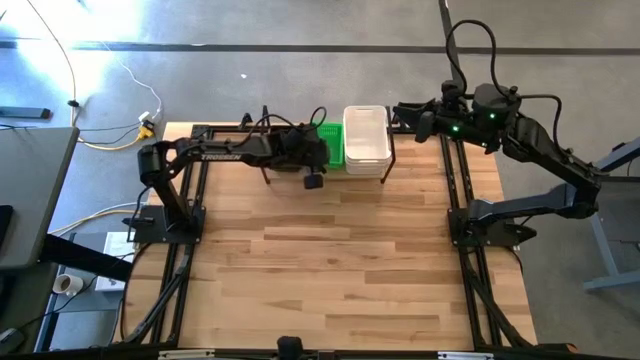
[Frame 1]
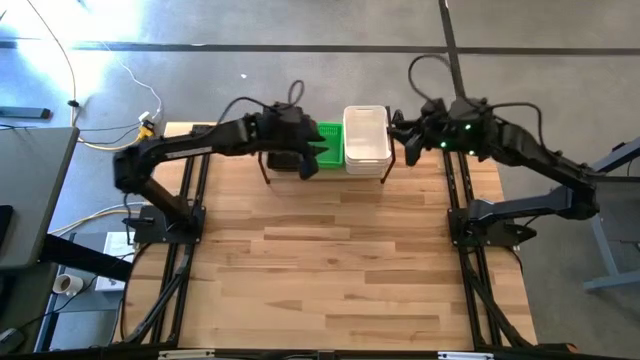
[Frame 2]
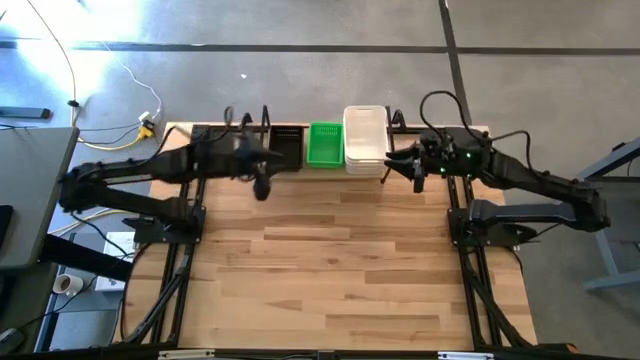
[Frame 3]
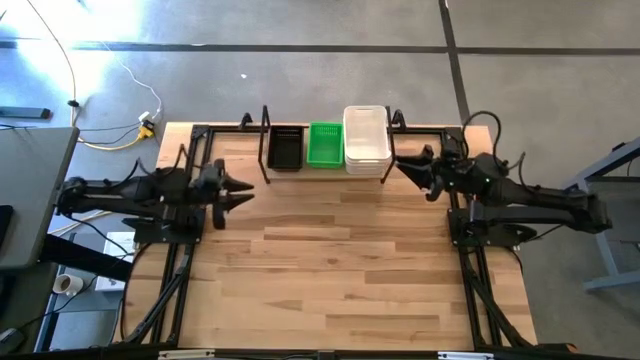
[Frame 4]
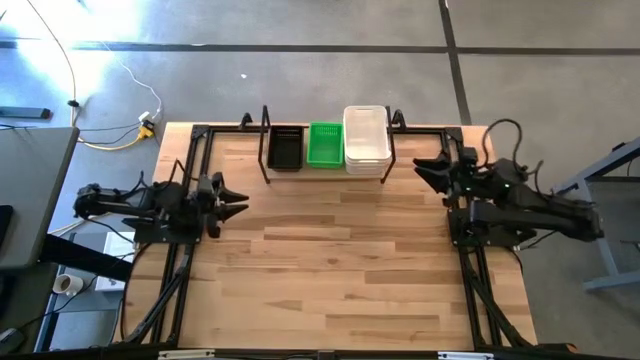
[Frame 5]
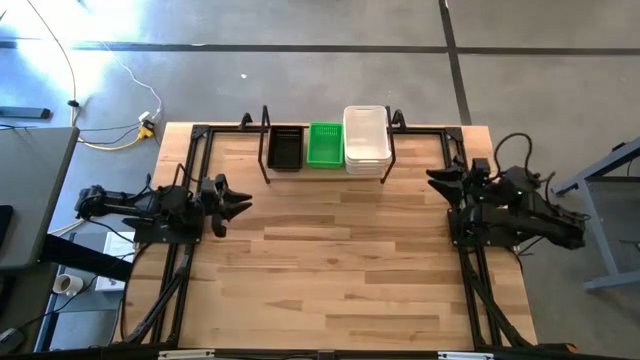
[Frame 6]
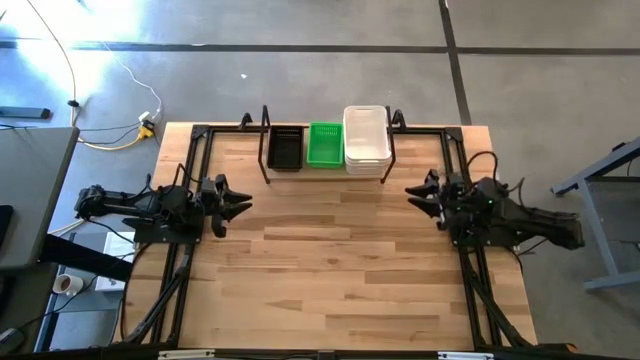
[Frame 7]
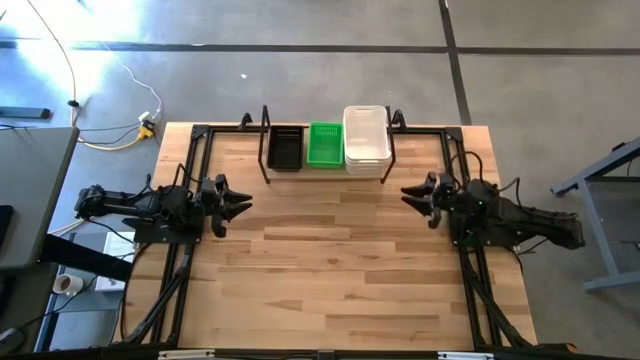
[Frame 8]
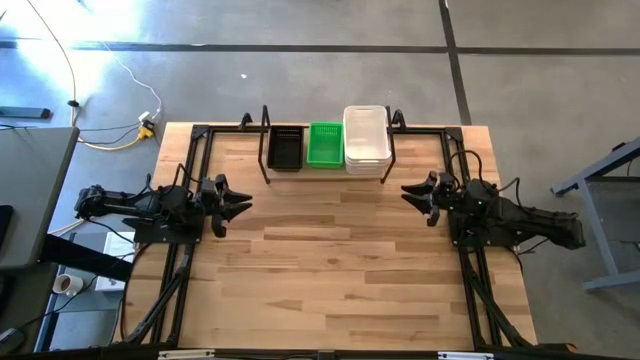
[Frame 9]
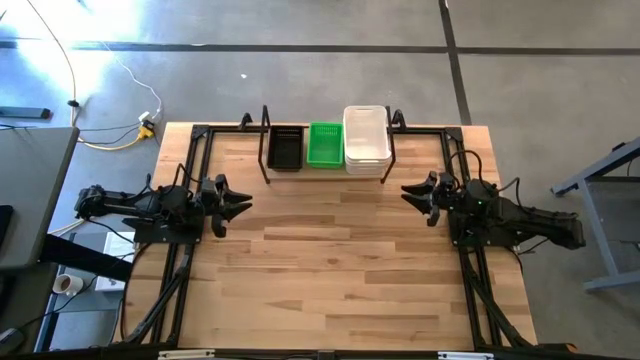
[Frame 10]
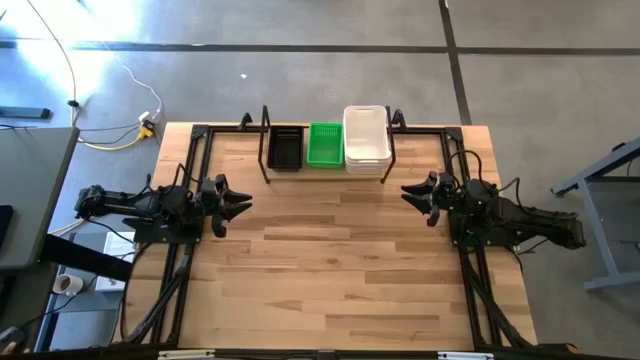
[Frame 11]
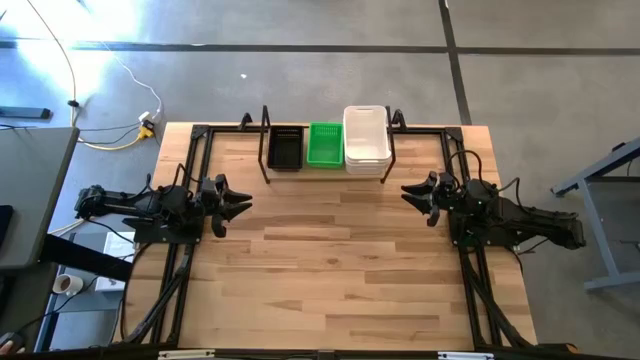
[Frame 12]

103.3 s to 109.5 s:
Task: Stack baskets on shelf by color
Return to Home Position

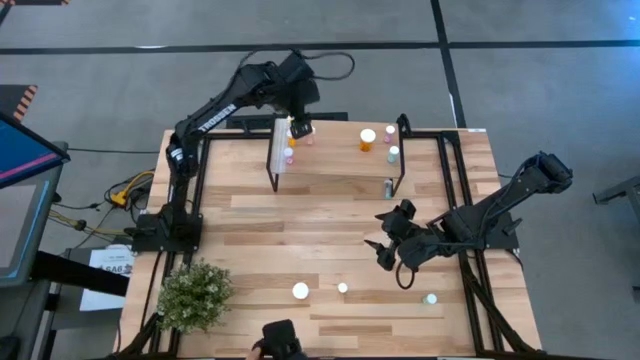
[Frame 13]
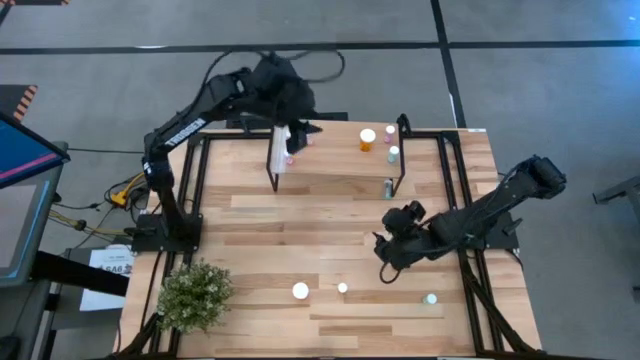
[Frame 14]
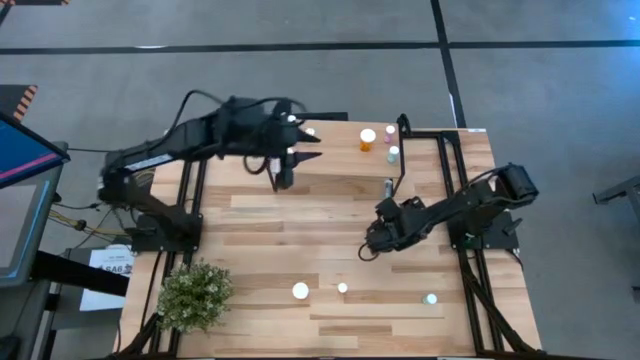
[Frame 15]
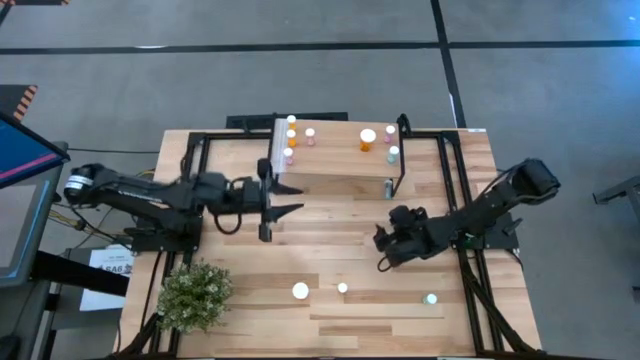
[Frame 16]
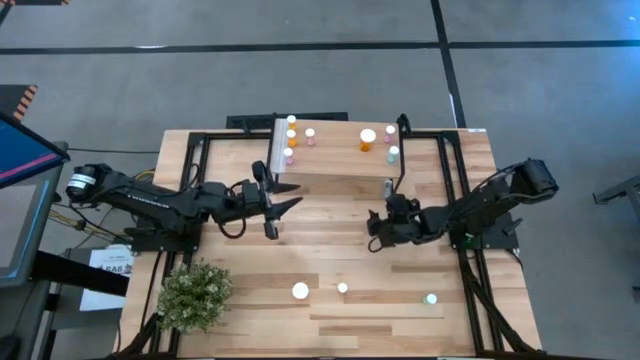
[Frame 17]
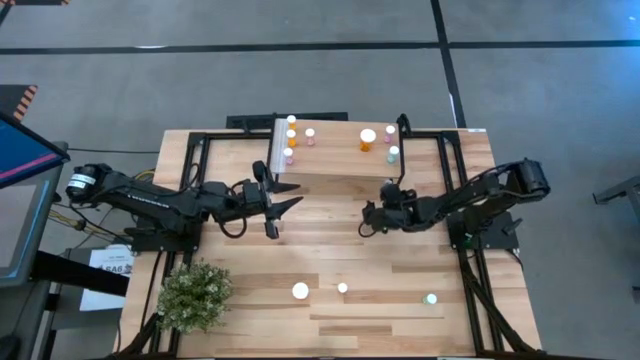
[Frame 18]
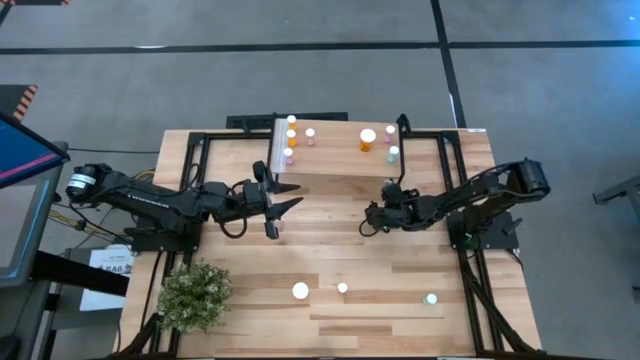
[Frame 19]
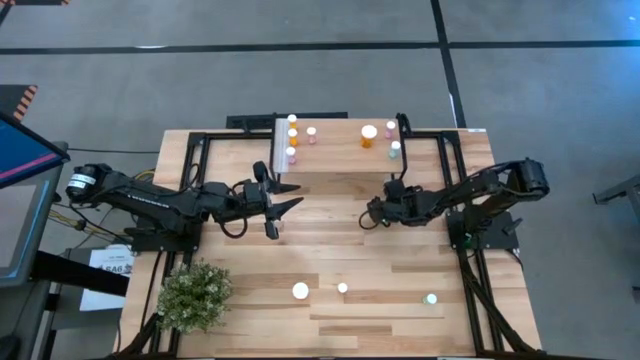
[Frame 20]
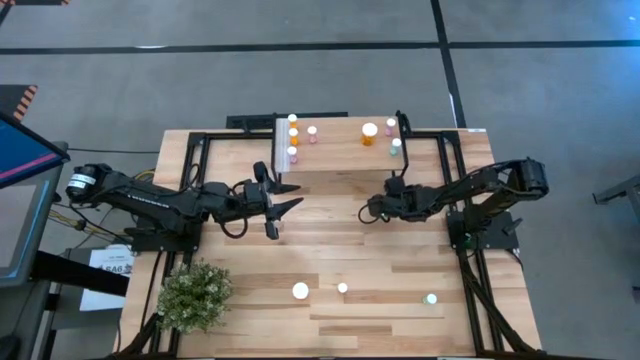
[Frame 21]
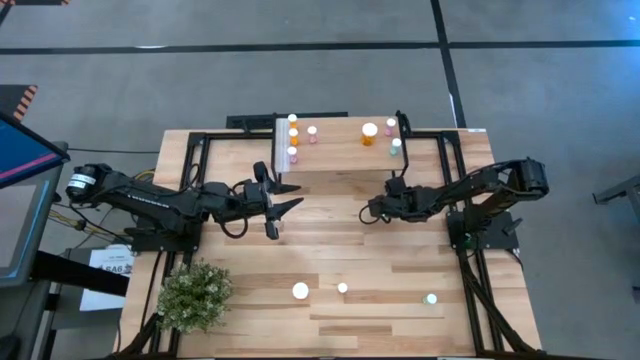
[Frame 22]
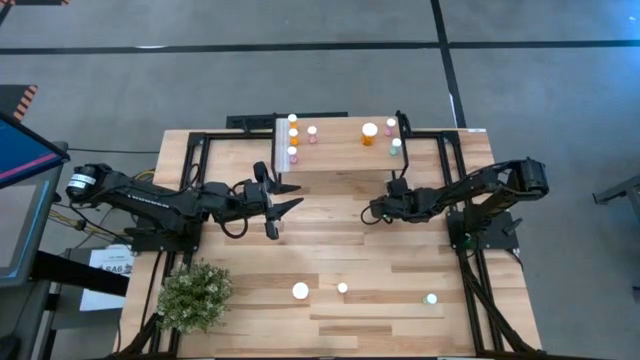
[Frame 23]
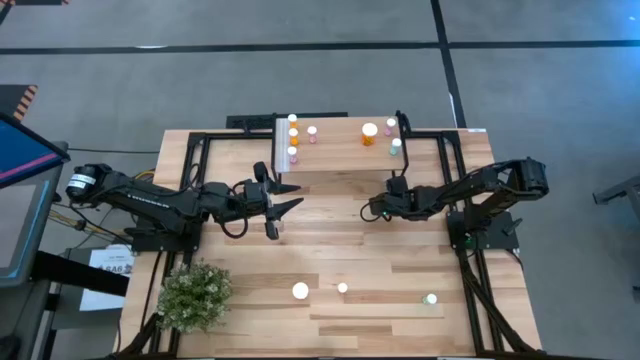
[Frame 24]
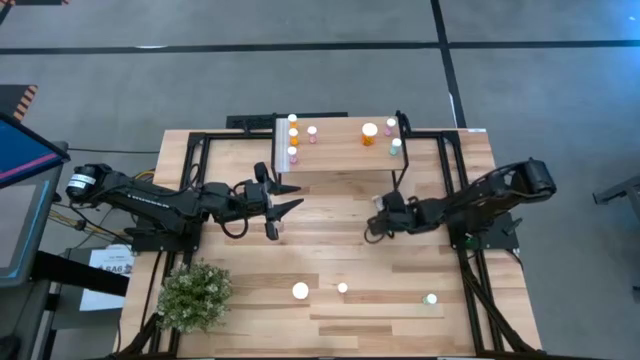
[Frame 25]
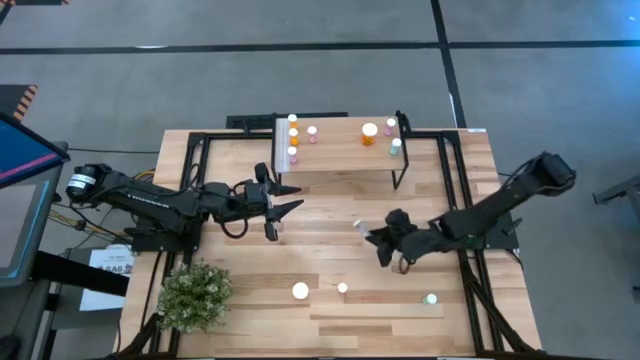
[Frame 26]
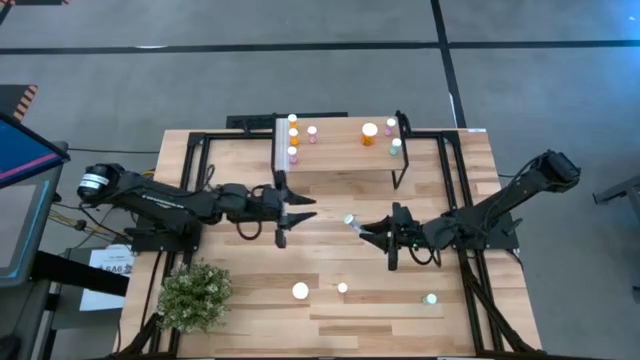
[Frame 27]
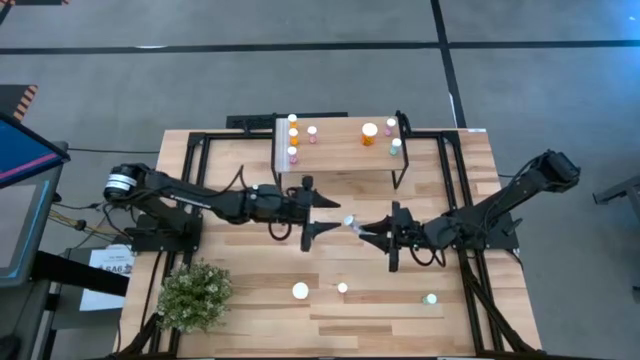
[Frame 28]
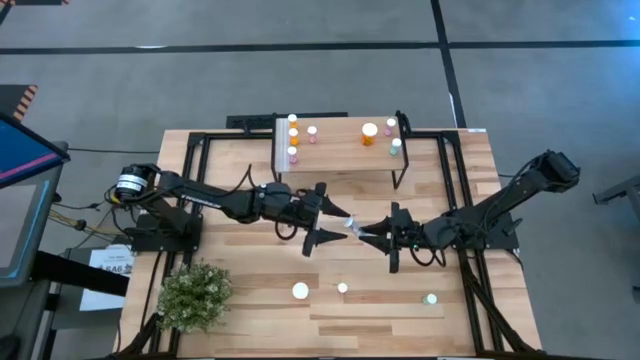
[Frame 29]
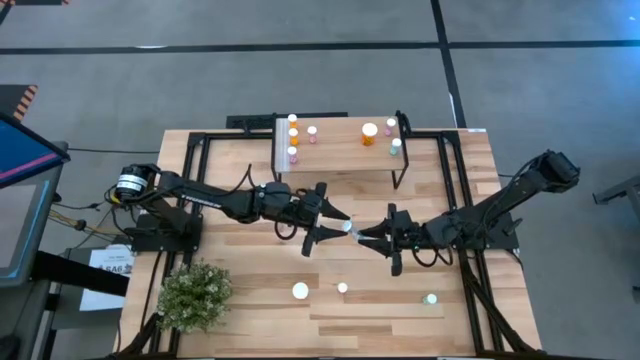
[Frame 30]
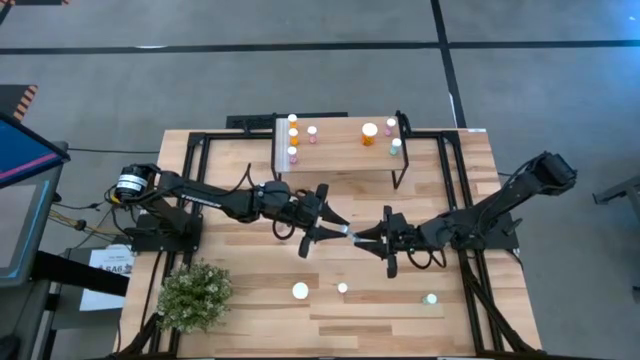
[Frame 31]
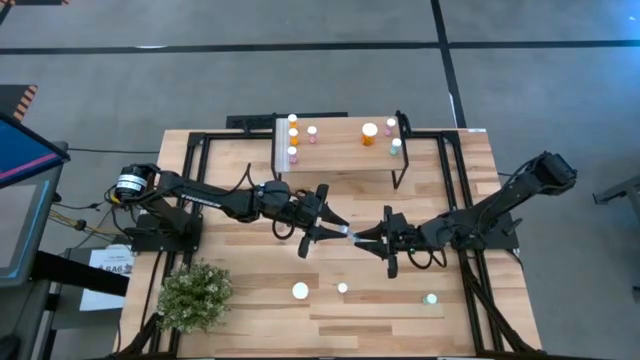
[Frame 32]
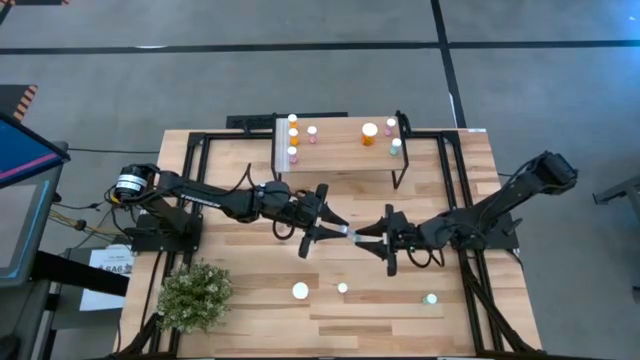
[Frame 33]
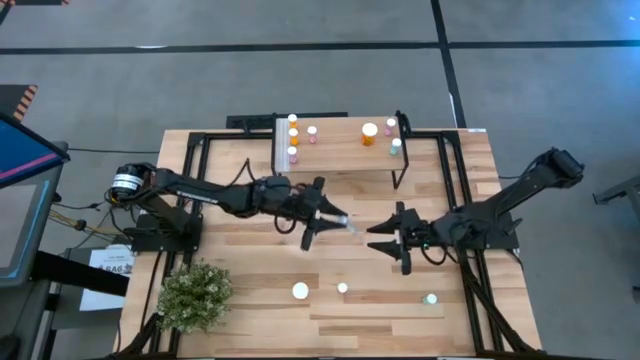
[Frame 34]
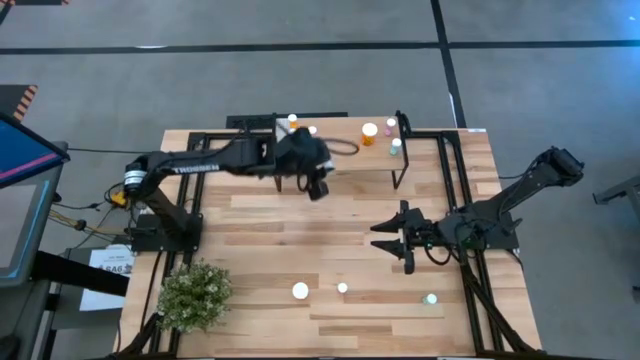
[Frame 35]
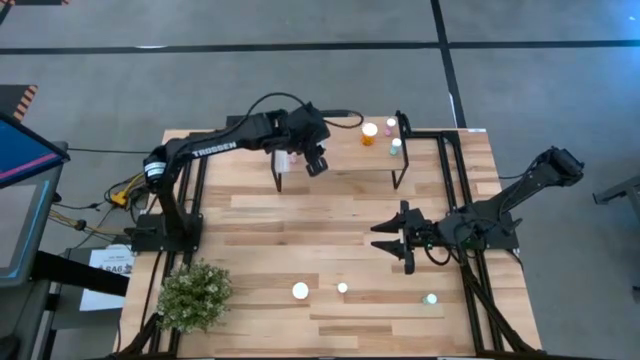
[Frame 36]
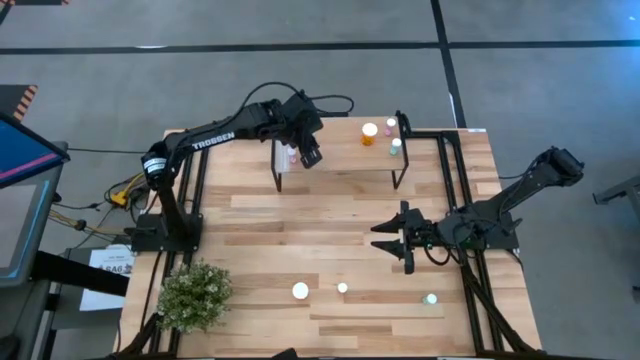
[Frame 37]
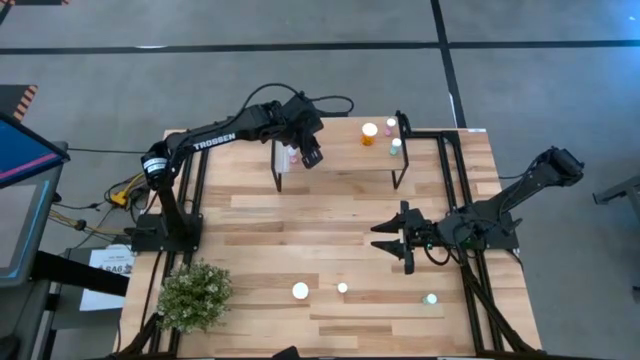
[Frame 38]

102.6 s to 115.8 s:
Task: Pick and place medicine bottles onto shelf by color
Put the top small blue pill bottle on the shelf
